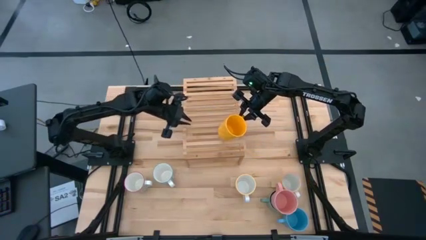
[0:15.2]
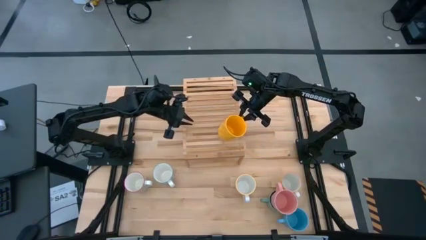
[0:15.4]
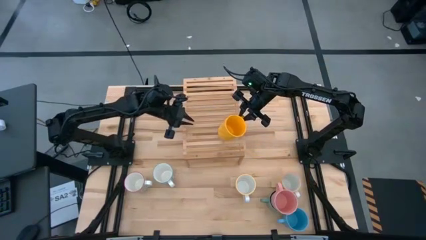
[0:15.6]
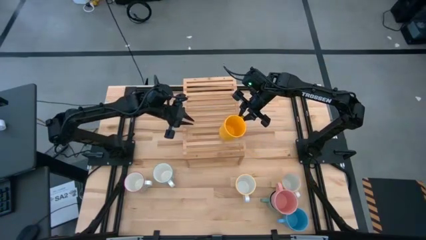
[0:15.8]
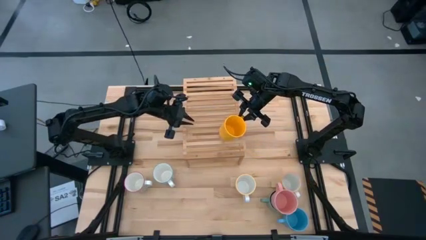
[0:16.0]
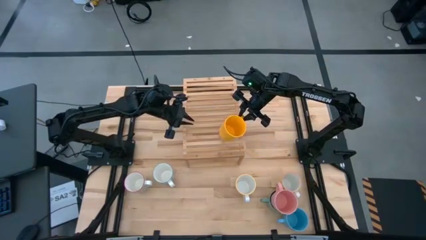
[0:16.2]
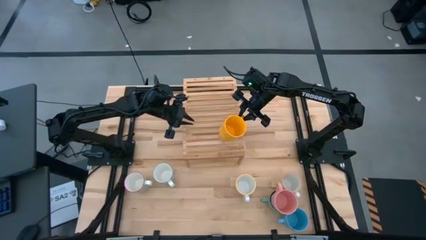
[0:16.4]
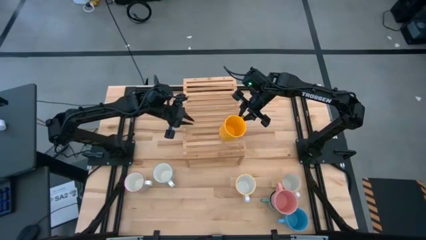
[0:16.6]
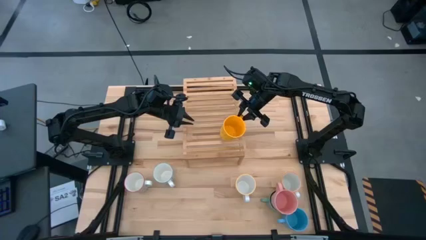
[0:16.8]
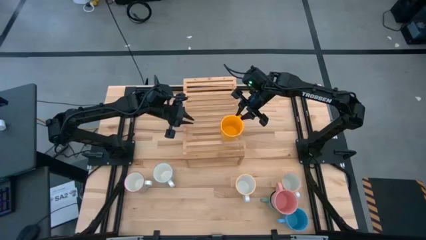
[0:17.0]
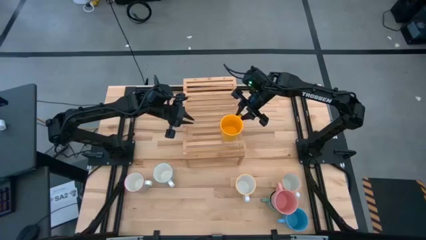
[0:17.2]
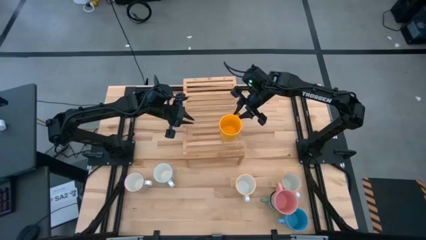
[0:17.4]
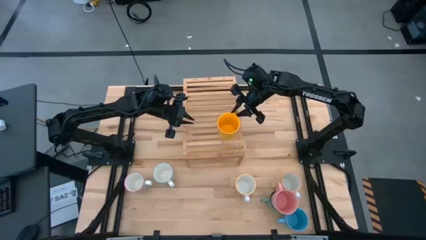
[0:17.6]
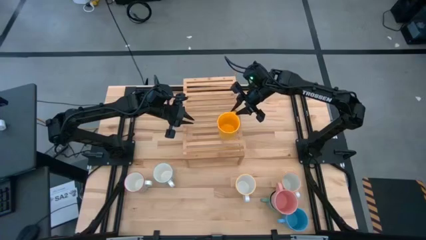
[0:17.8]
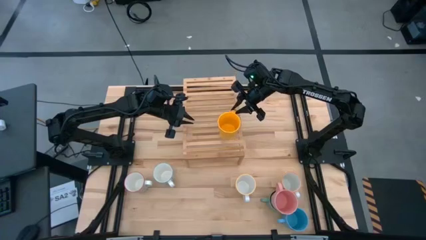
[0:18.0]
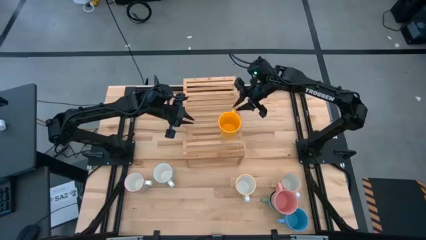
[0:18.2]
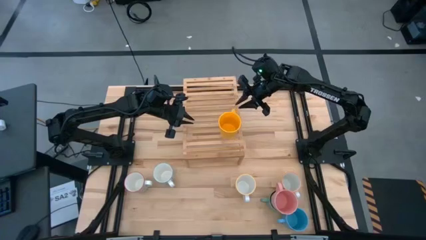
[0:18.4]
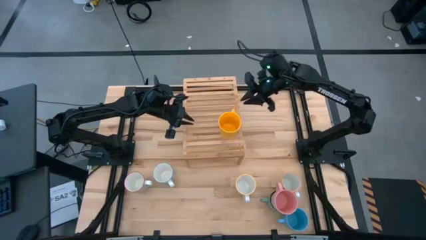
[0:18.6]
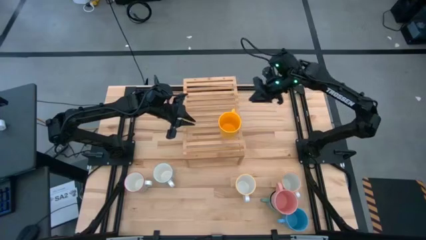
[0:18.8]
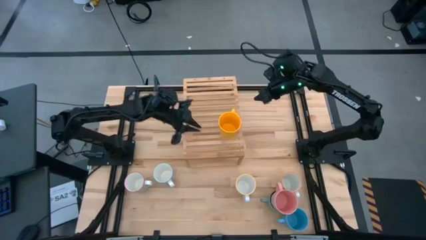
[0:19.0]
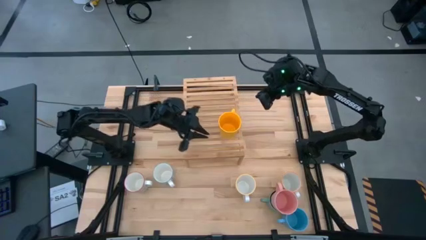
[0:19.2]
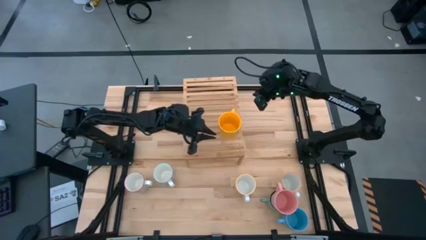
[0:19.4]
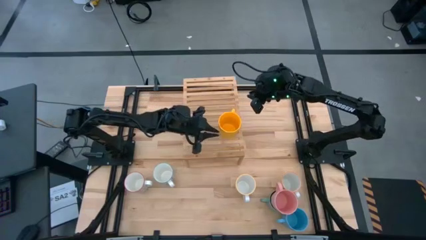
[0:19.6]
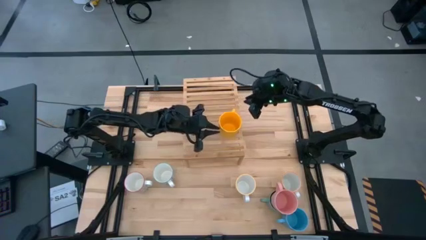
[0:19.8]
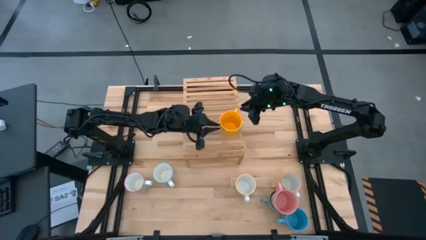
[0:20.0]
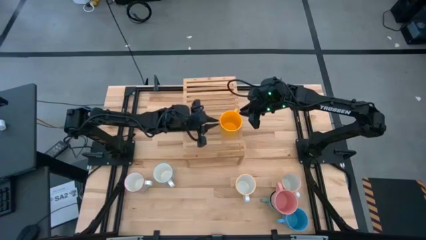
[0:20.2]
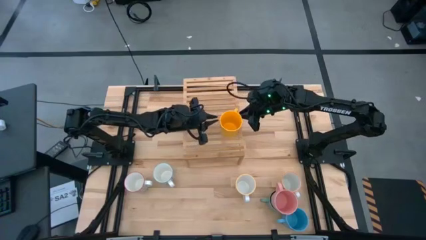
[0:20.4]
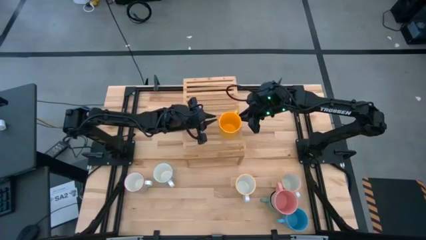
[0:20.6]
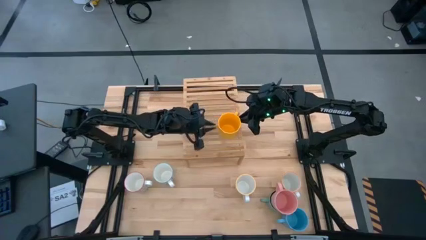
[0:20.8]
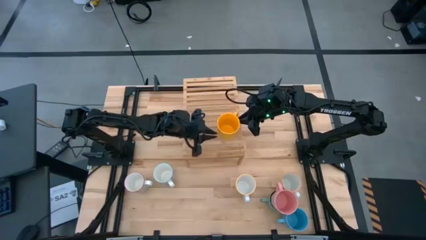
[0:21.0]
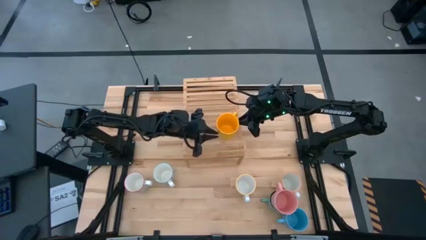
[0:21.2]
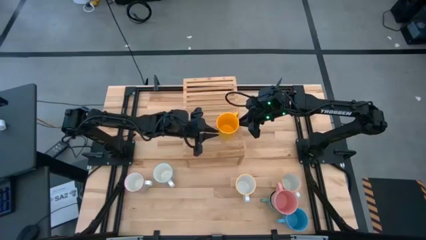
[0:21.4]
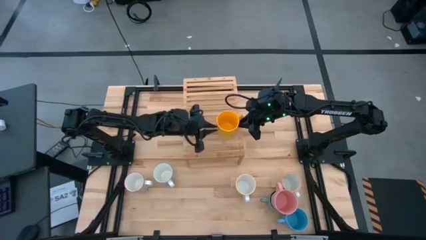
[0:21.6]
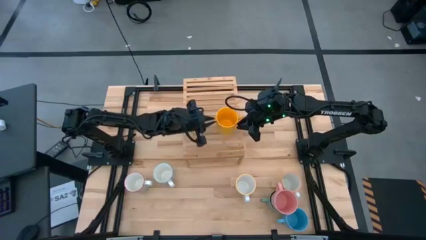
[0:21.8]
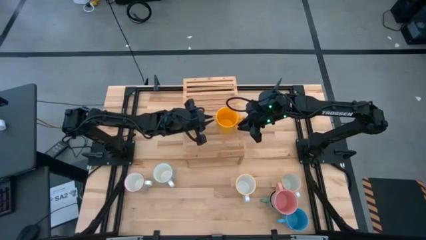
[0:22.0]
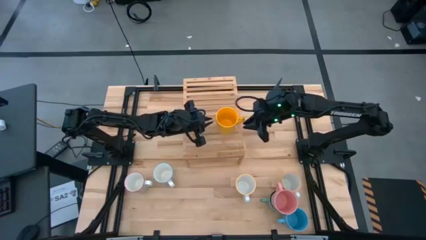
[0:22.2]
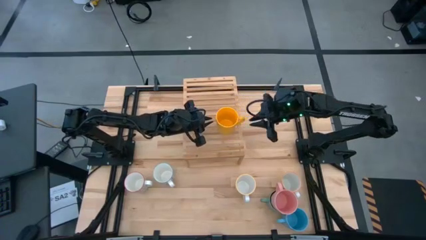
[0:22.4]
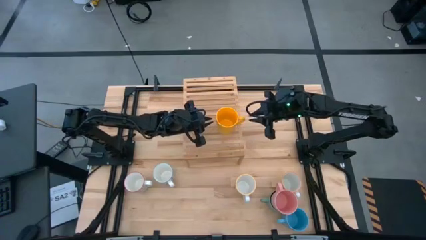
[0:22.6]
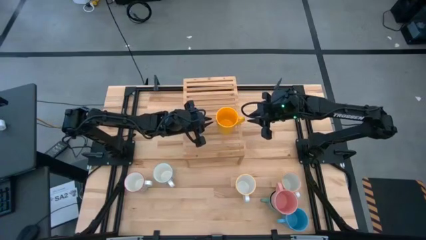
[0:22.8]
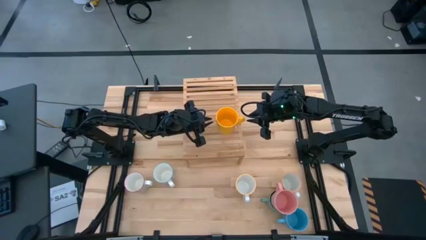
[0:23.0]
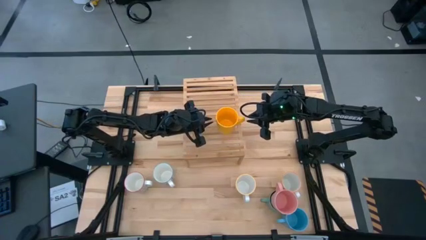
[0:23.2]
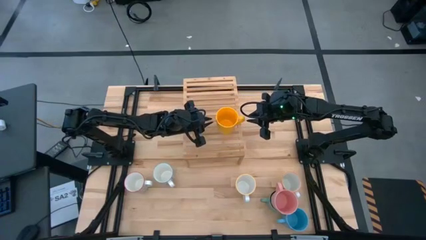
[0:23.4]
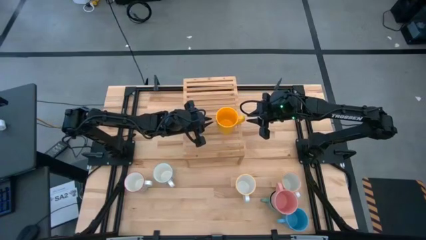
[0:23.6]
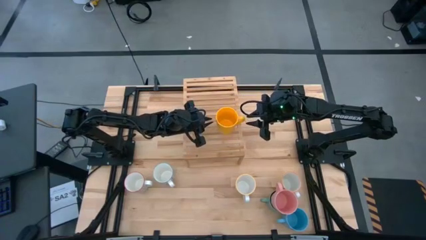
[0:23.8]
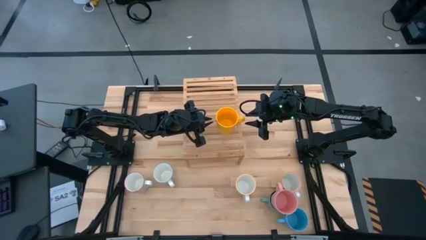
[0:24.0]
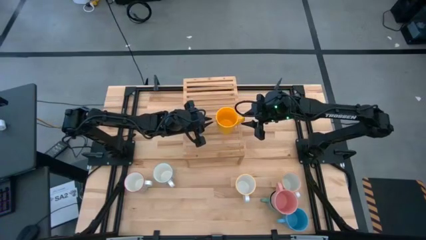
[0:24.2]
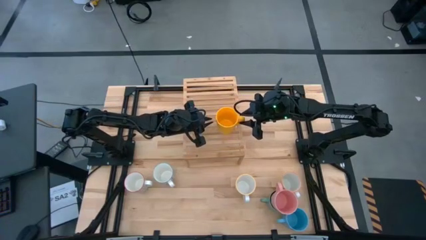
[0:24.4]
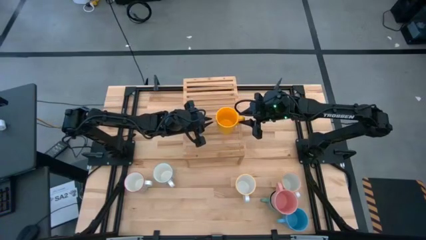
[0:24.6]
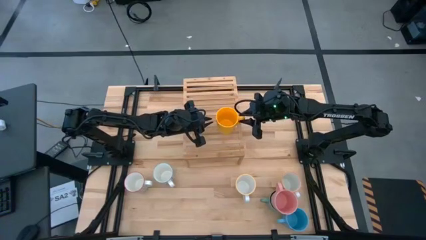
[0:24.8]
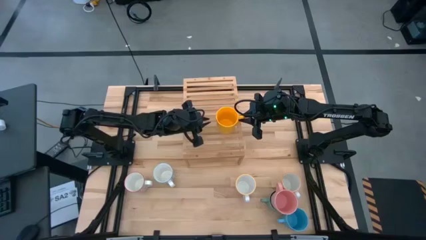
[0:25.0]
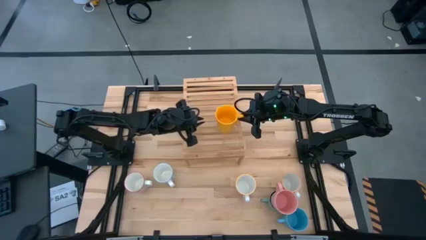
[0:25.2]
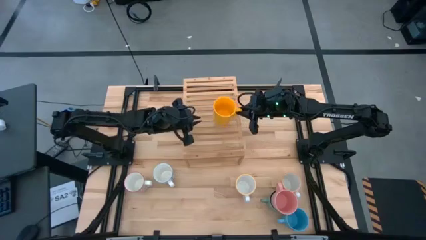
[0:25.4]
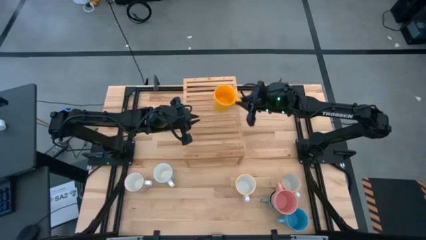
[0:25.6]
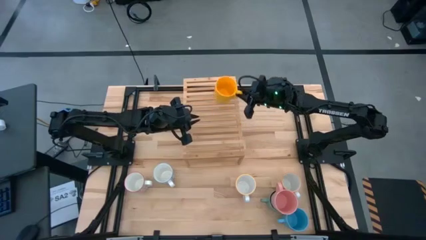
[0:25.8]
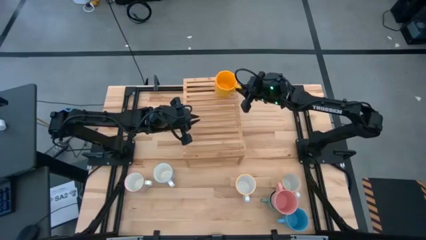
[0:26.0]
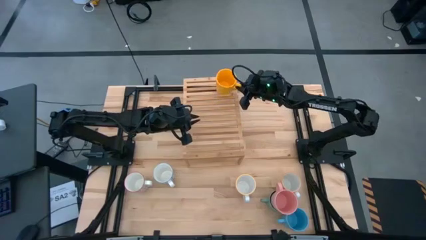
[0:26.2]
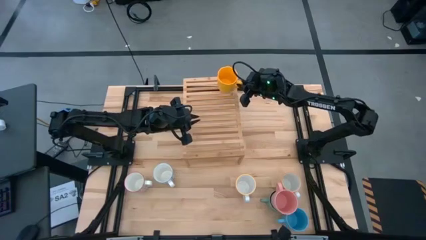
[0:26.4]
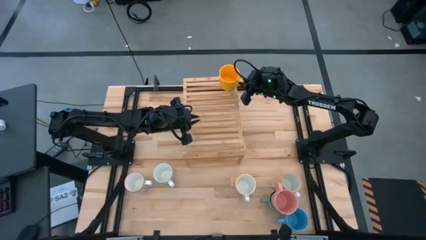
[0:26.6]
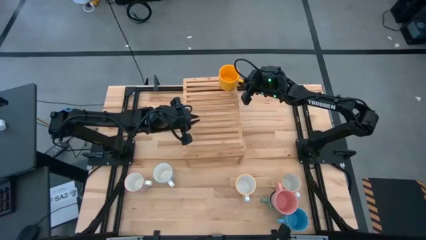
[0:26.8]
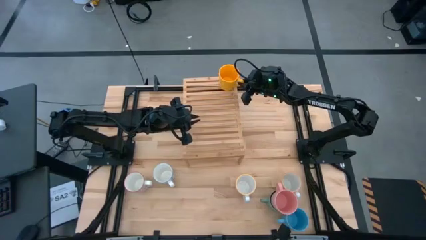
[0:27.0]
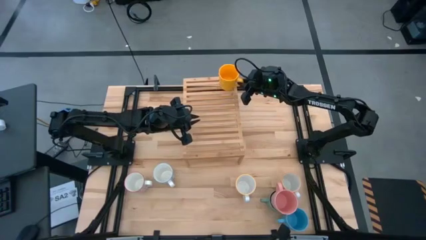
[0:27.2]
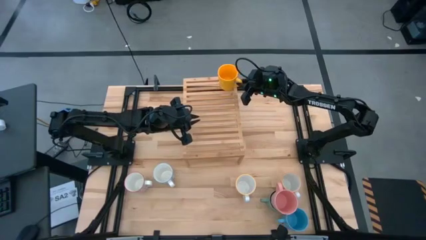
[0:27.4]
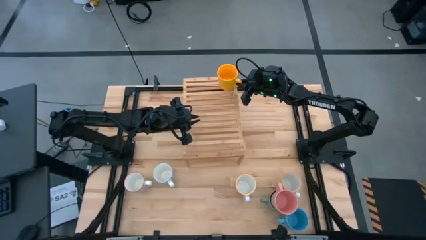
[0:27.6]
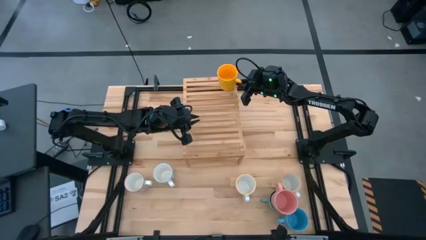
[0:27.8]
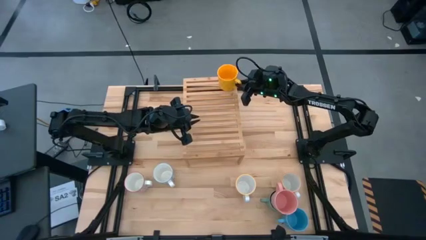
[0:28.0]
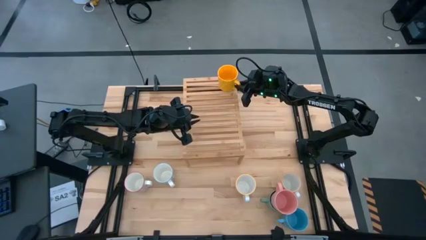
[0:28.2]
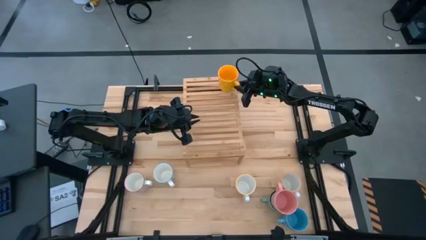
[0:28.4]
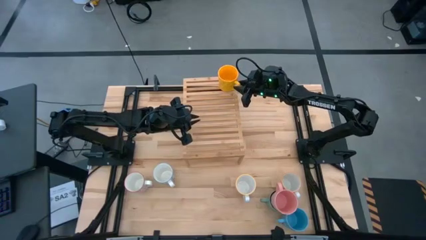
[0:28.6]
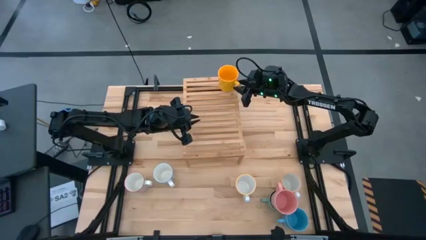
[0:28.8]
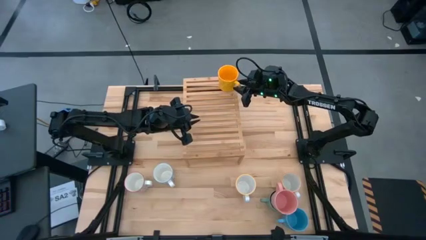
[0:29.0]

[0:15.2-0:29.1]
Task: Place coffee mugs
Put the top yellow cup on the shelf
